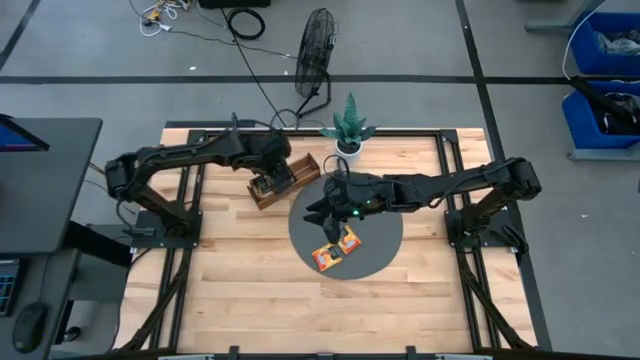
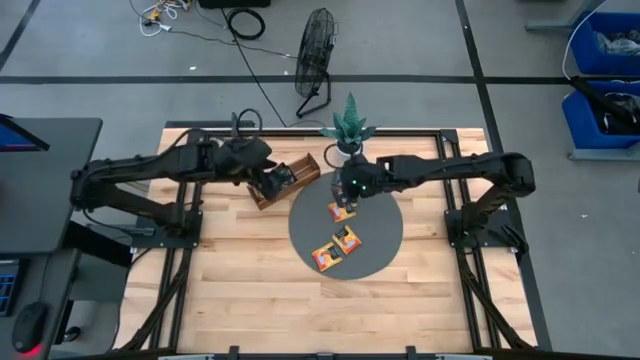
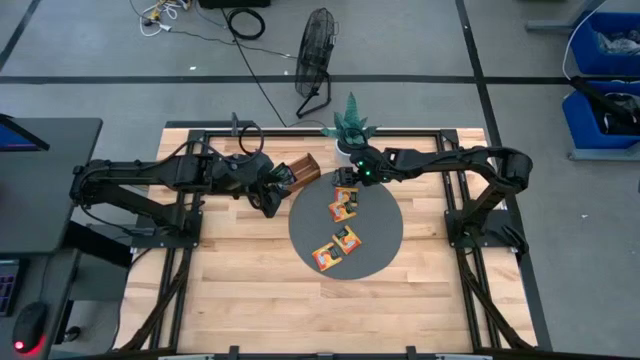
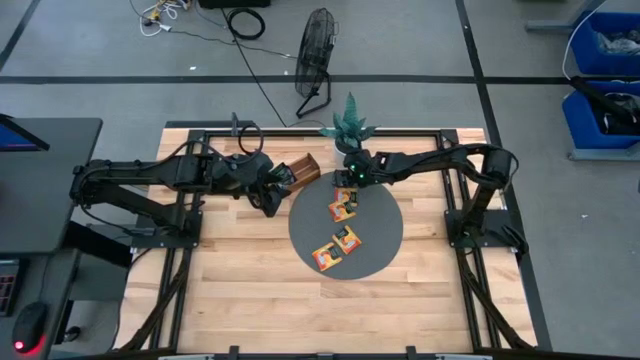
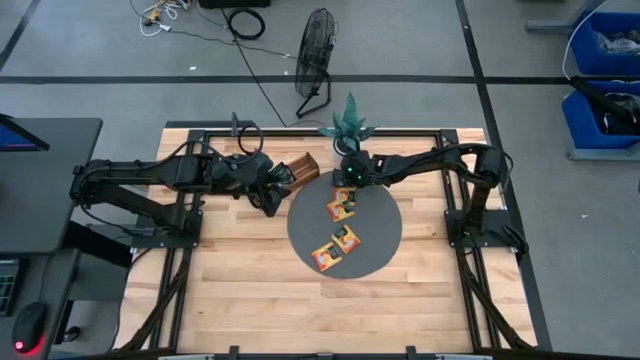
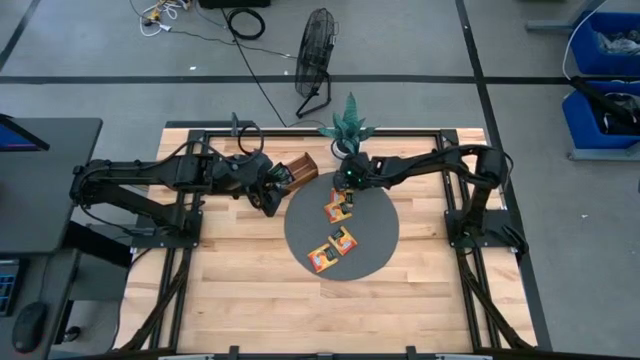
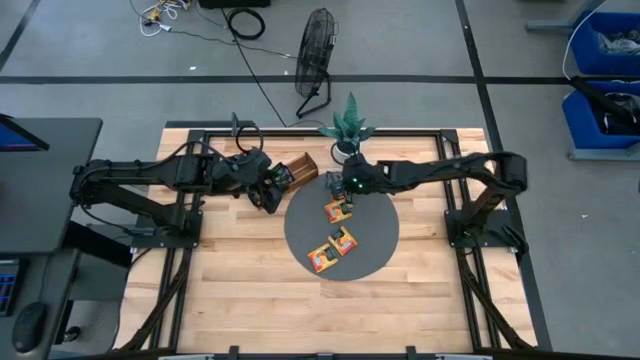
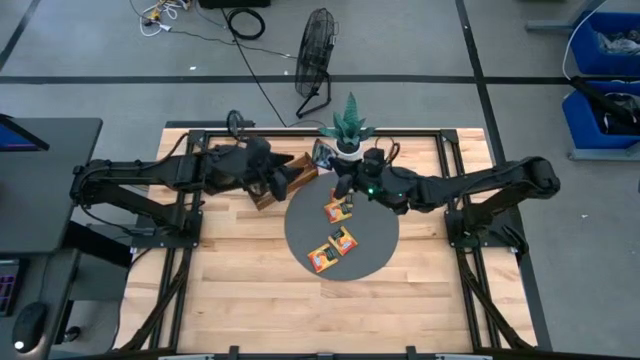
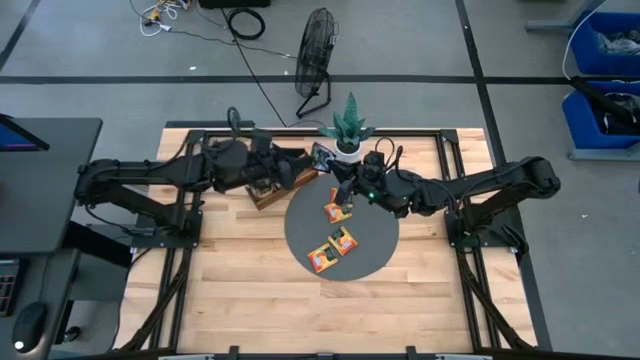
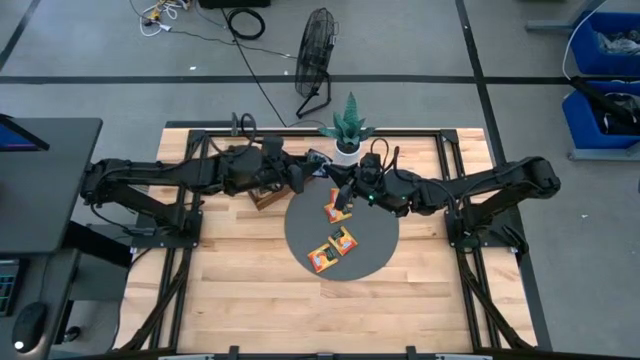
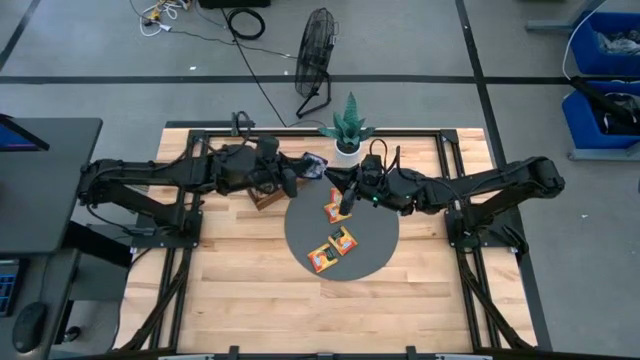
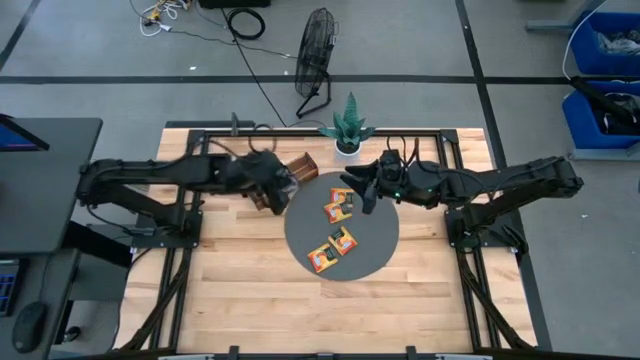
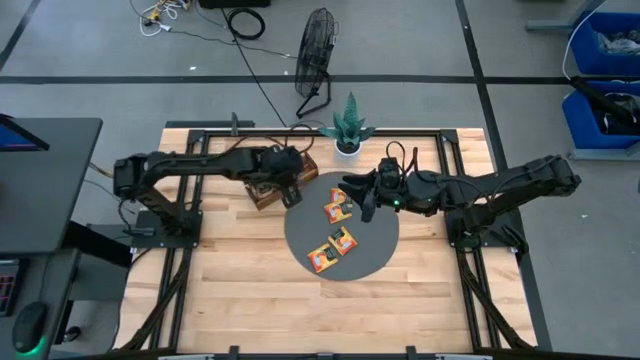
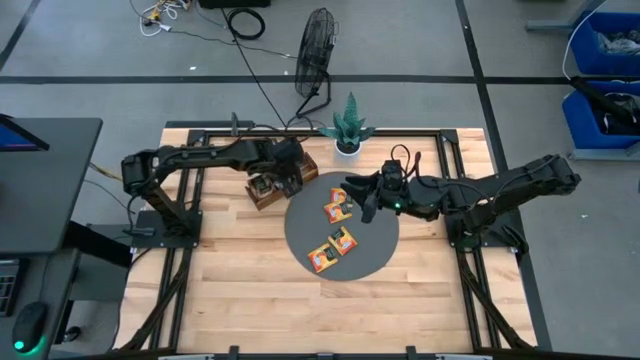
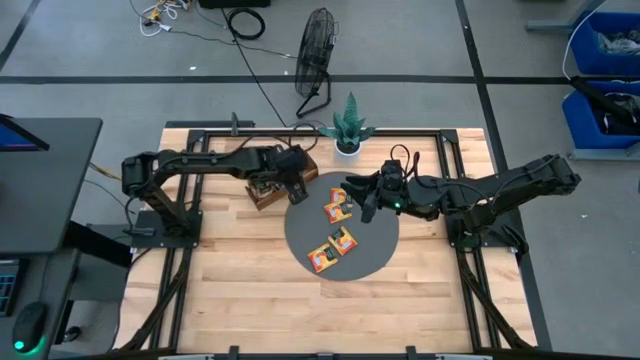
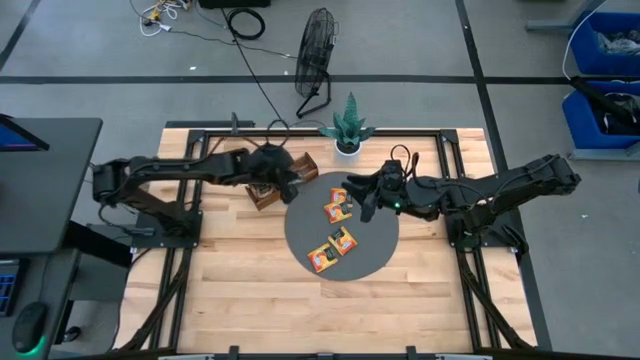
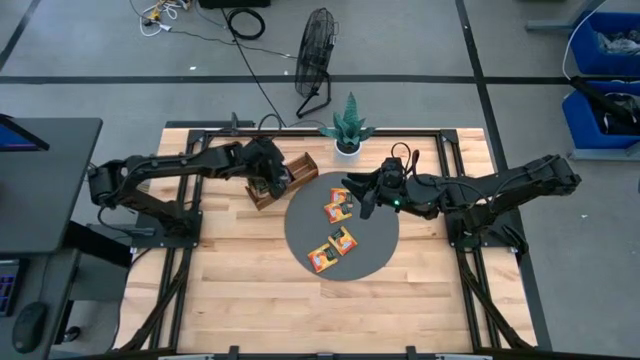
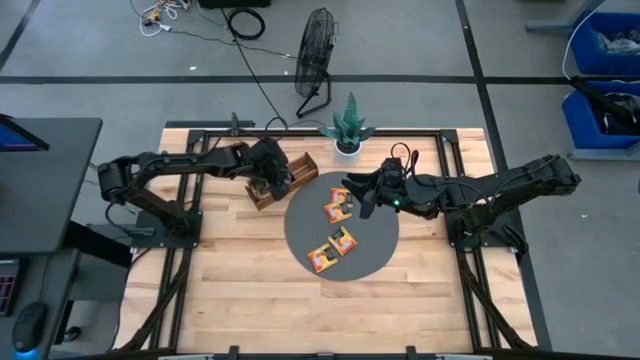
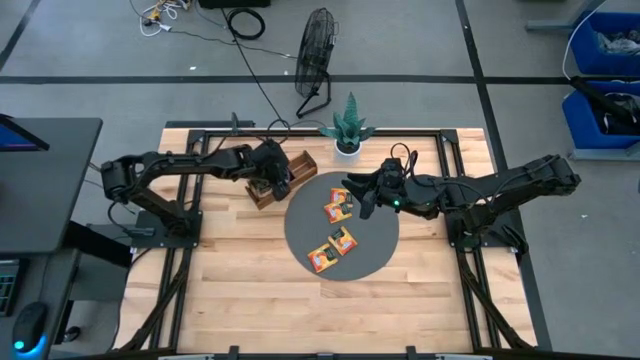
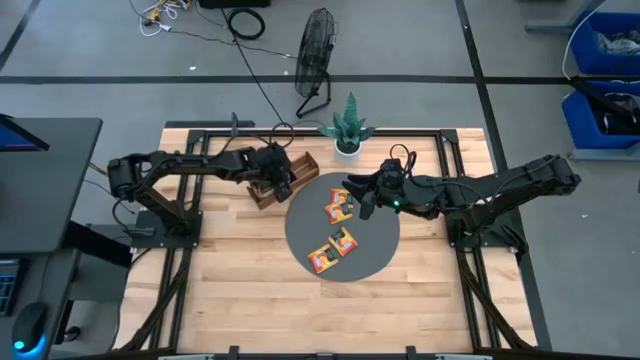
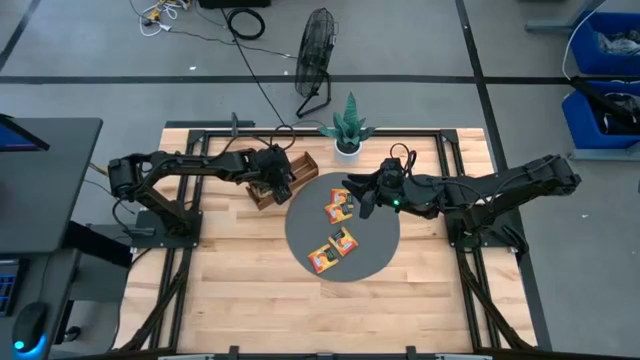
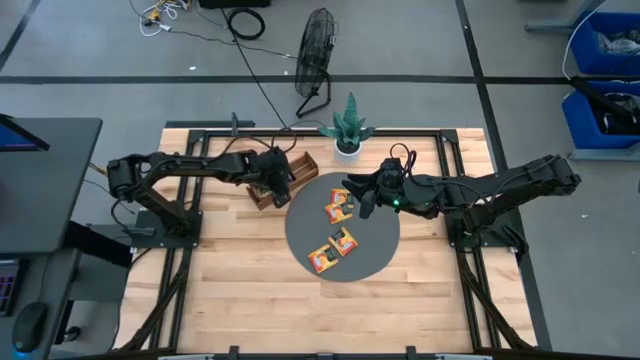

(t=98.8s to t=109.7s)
Task: Pick & Place Tea
Put the purple tea bag into the middle section of the wooden organizer

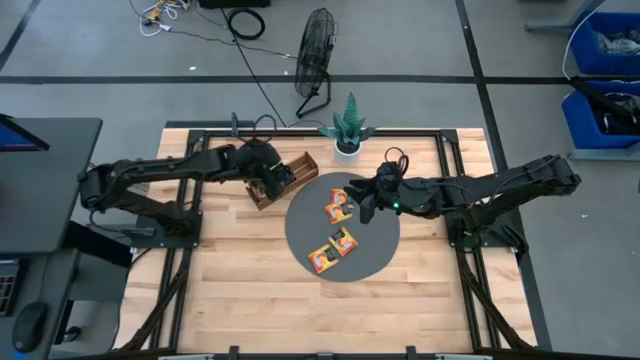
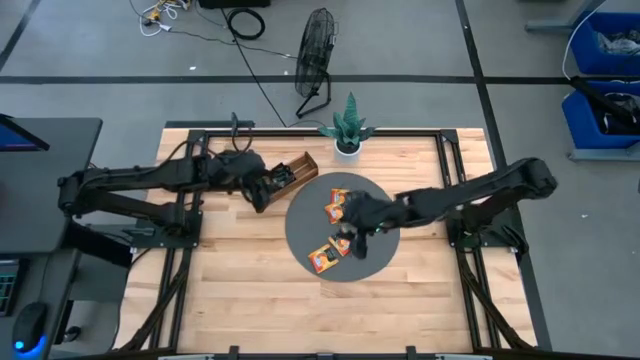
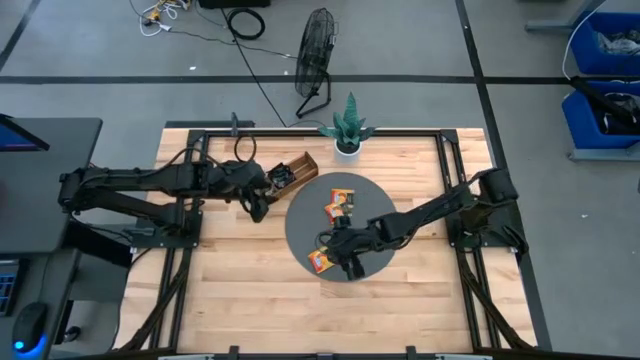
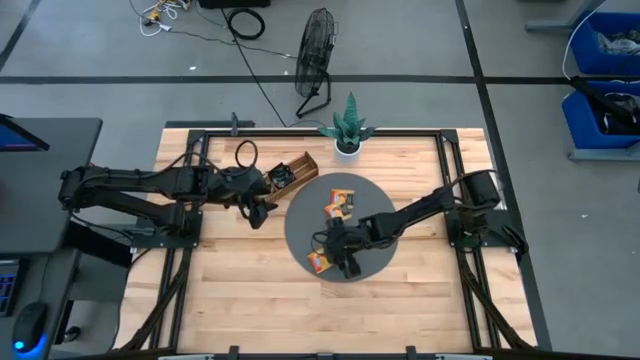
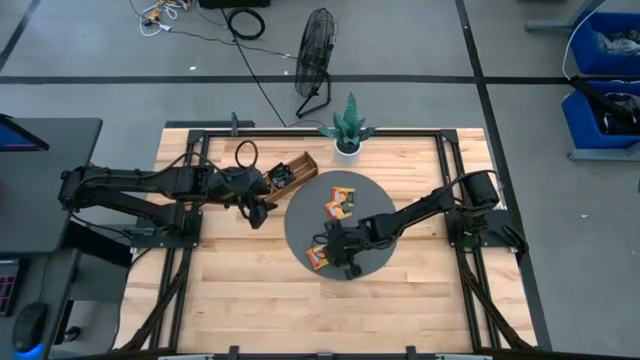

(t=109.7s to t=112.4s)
Put the orange tea bag into the right section of the wooden organizer

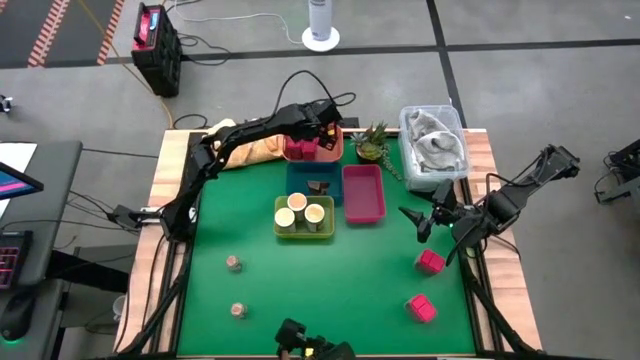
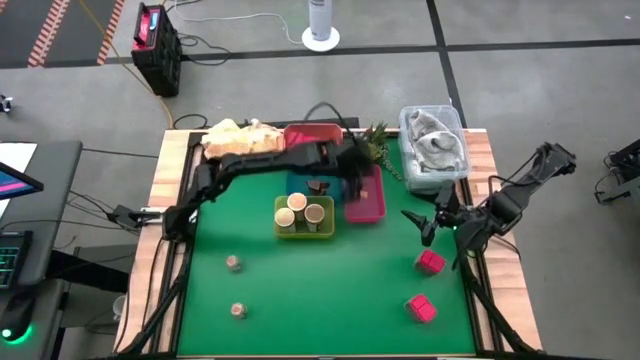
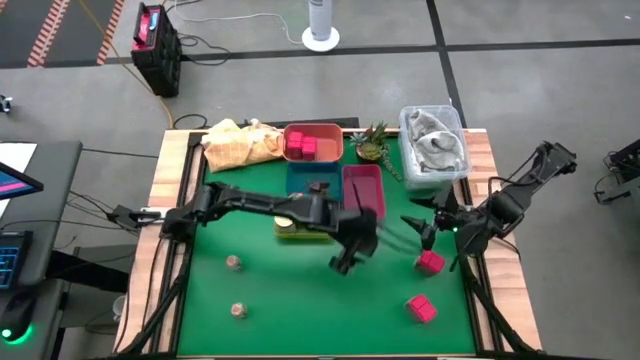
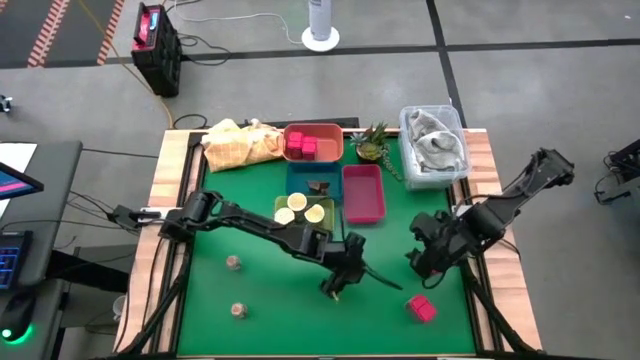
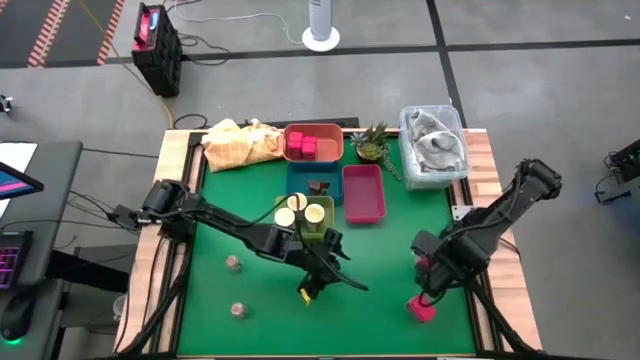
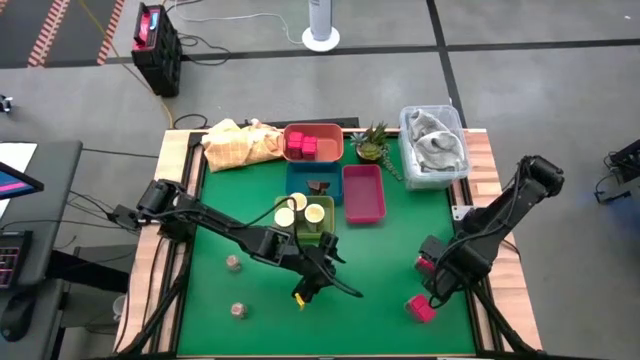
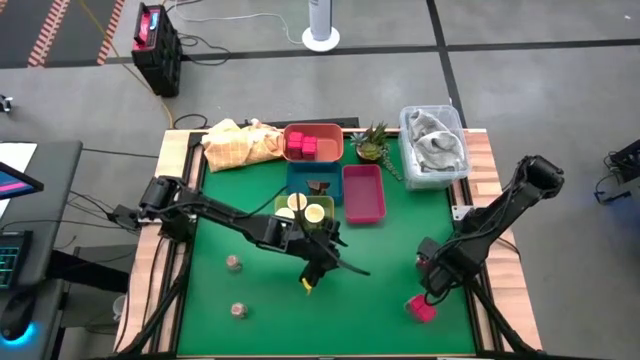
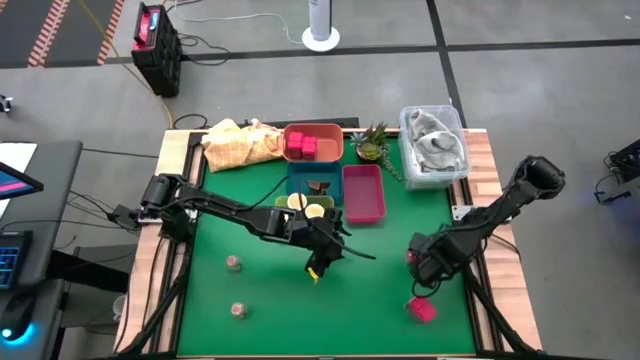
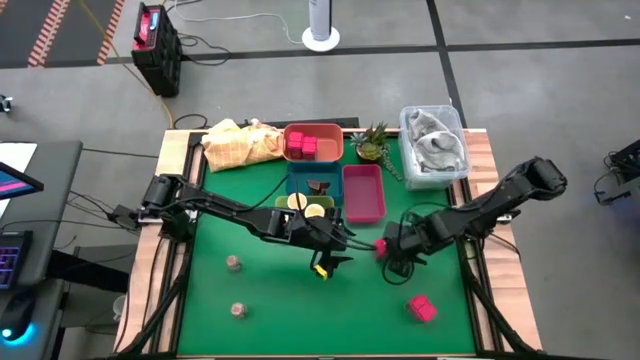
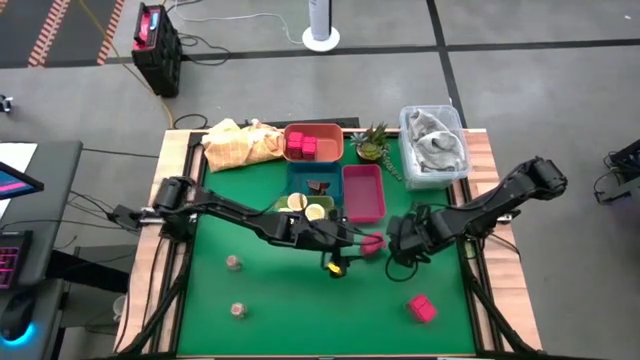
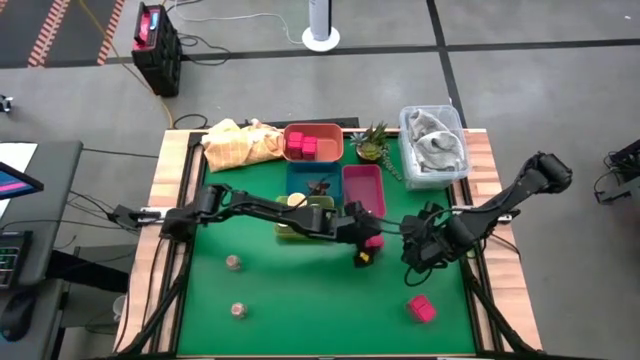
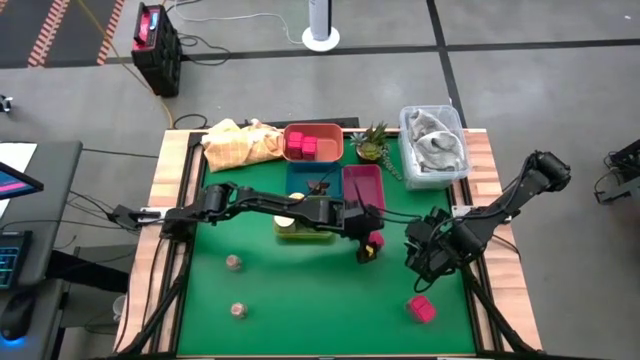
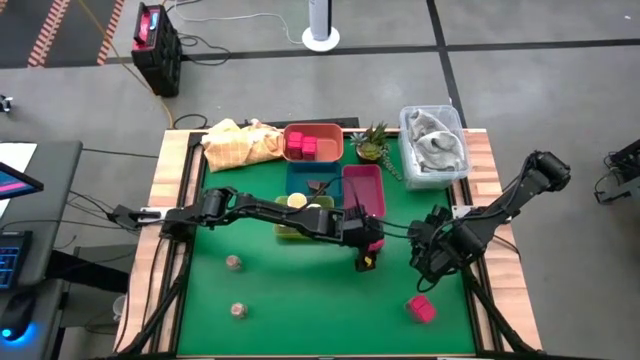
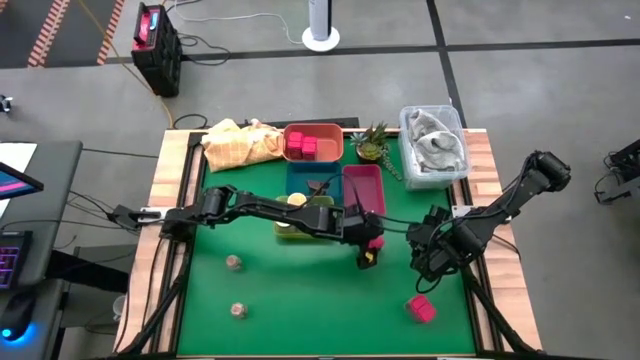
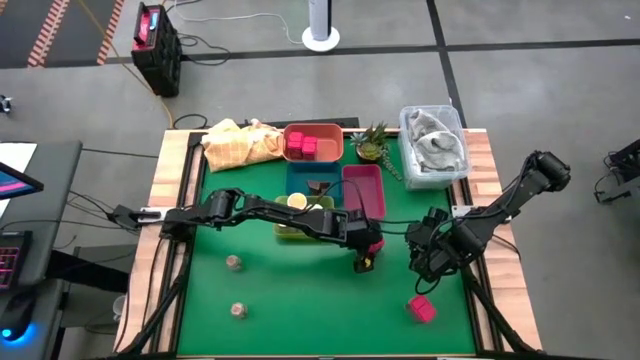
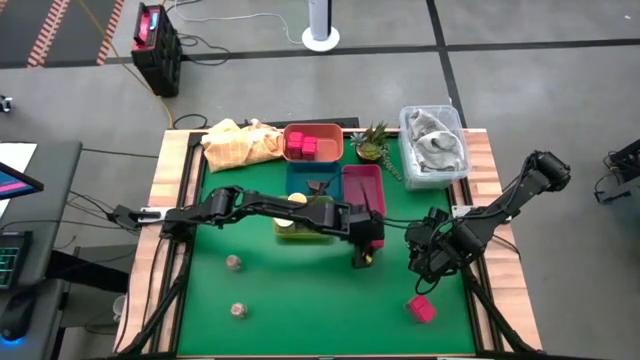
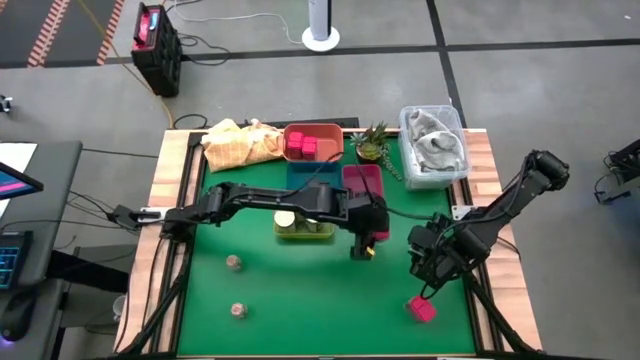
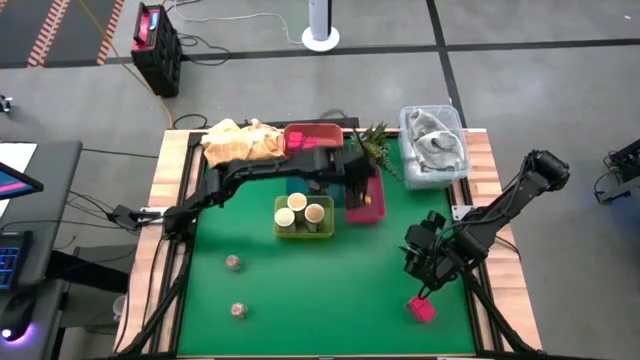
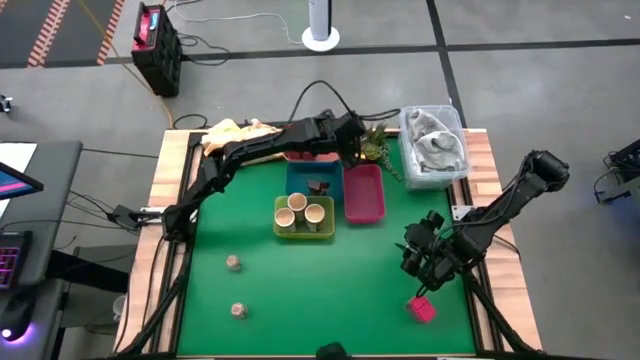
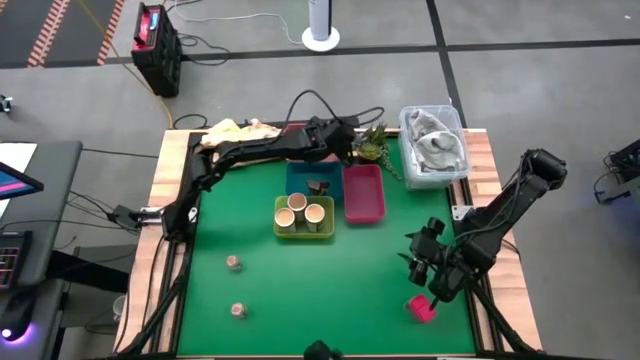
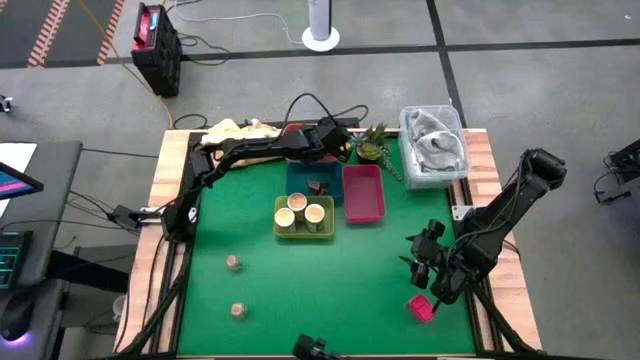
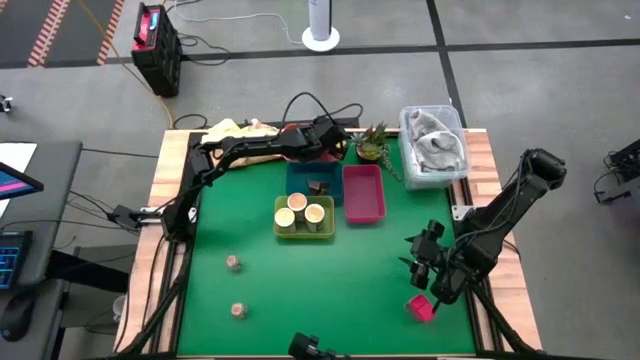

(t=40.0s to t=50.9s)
Task: Sort spices by type
Put the top red seasoning can into the orange bin
